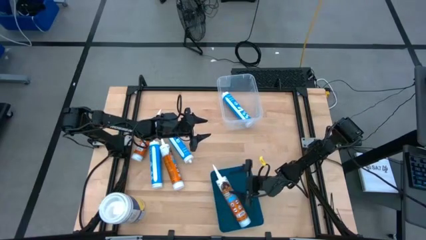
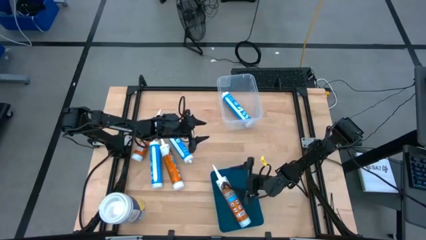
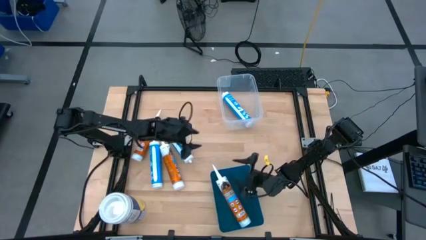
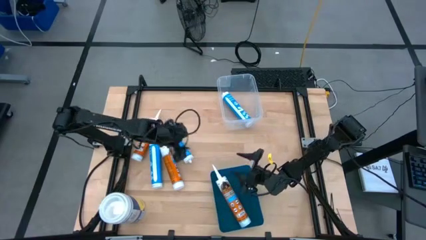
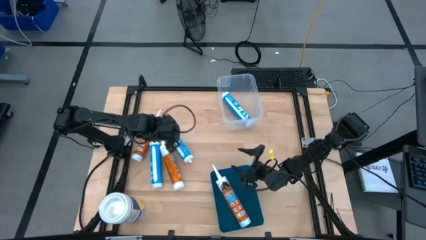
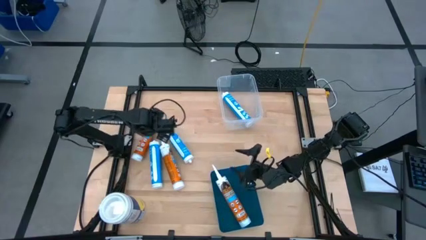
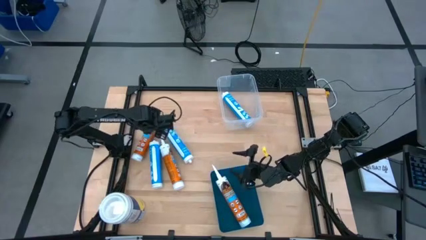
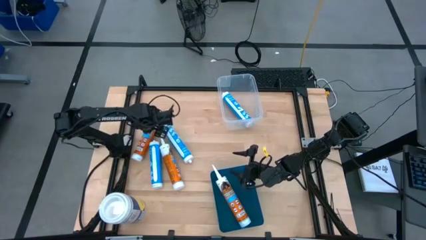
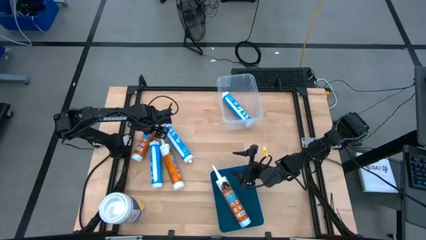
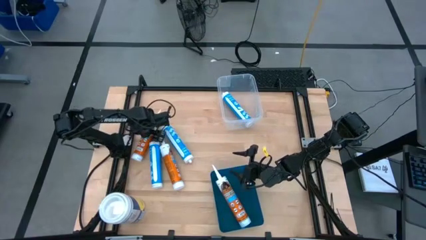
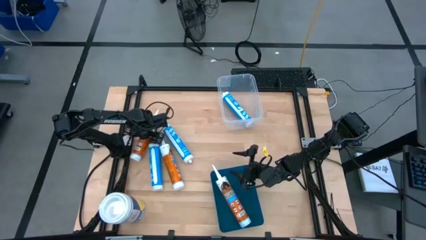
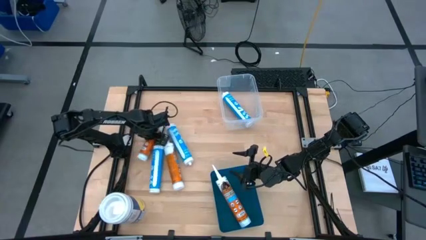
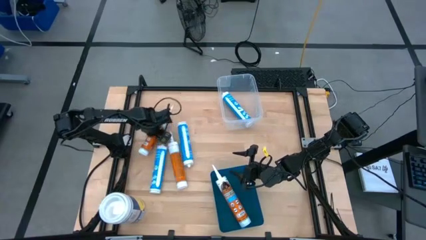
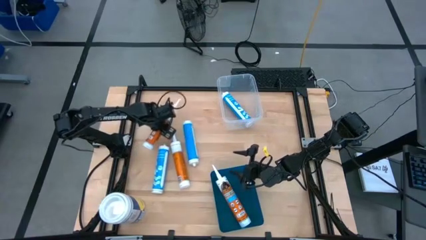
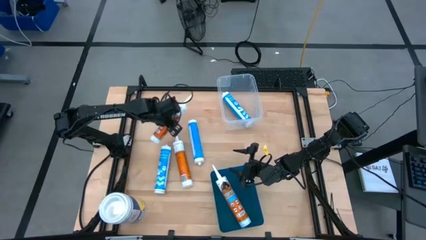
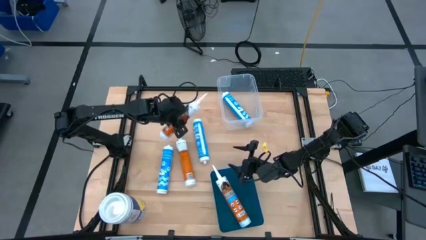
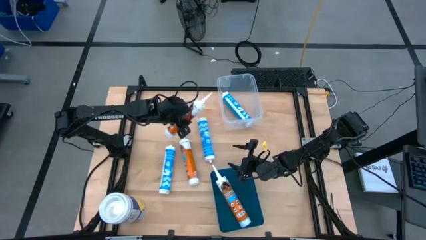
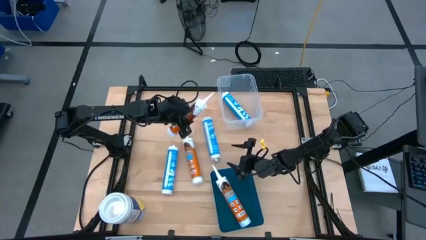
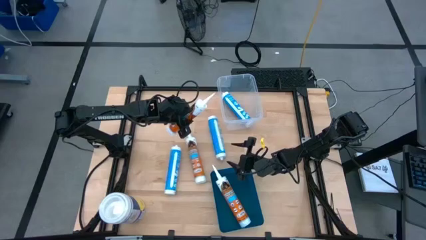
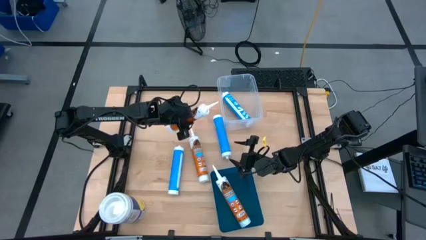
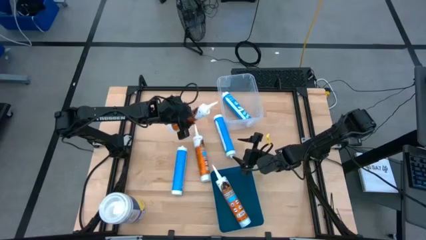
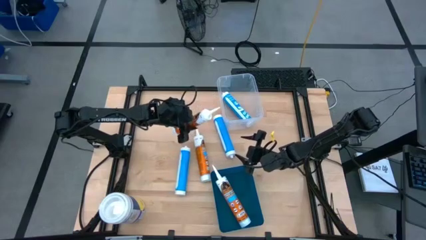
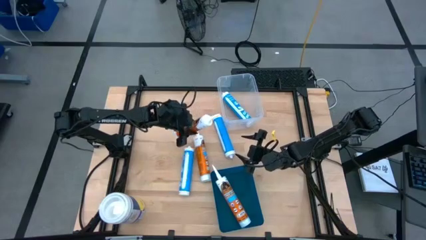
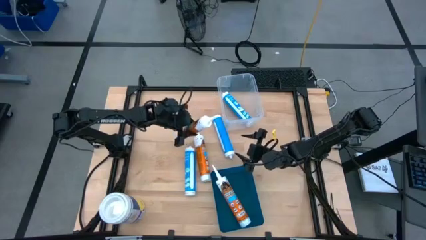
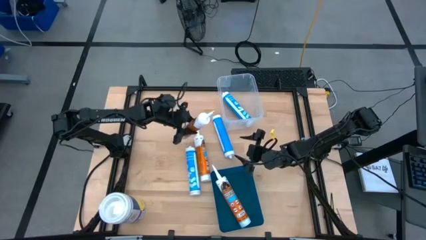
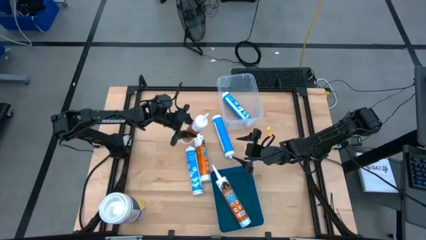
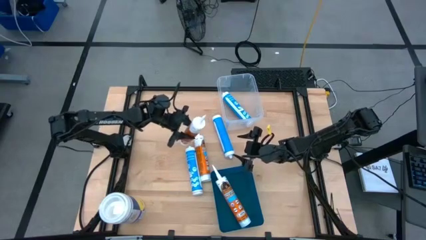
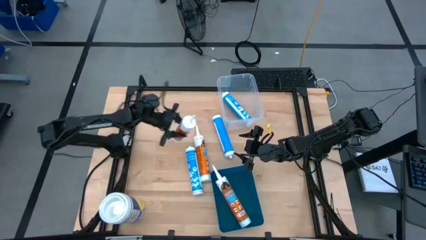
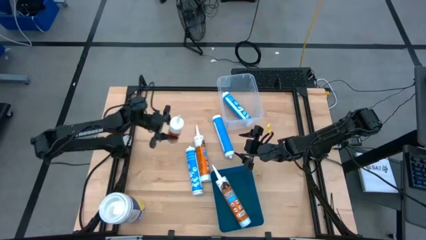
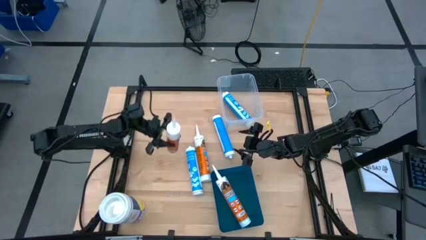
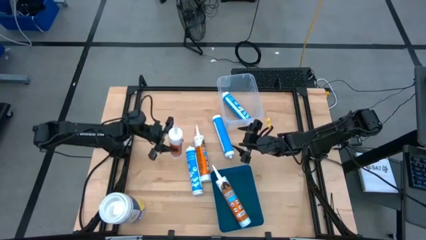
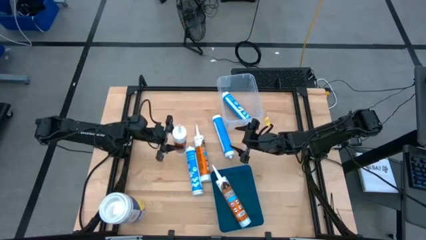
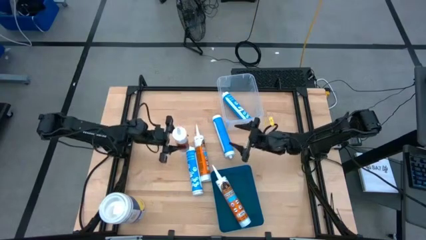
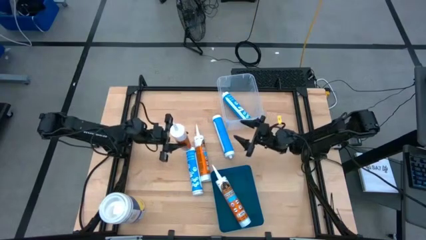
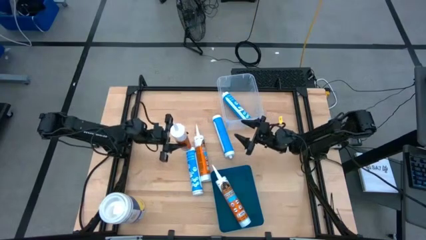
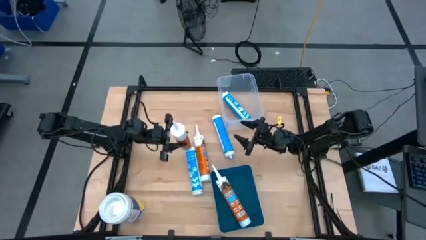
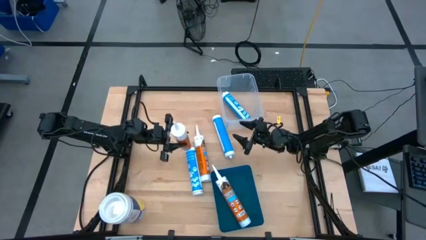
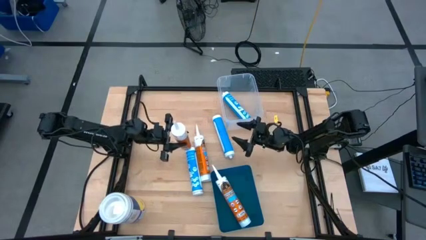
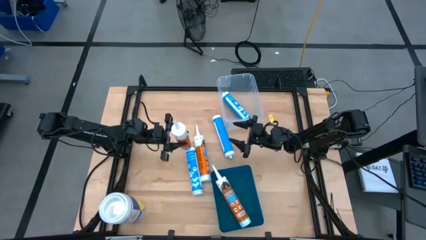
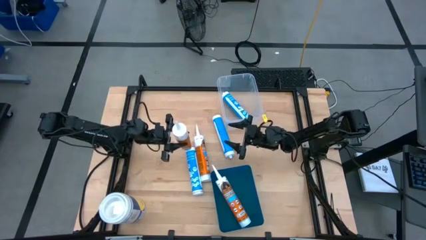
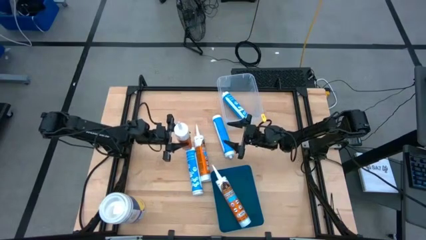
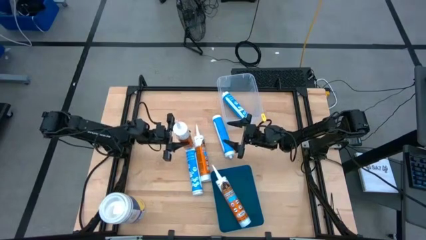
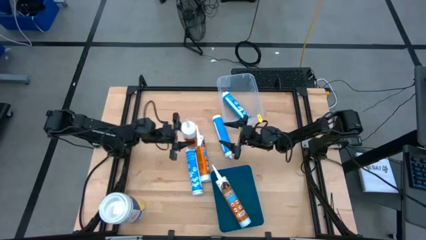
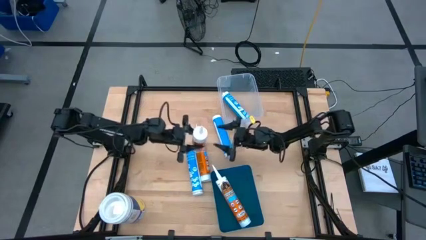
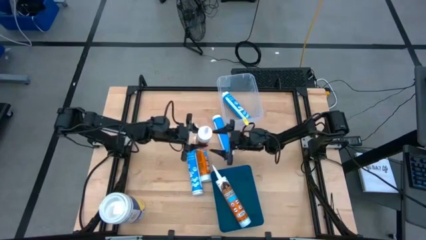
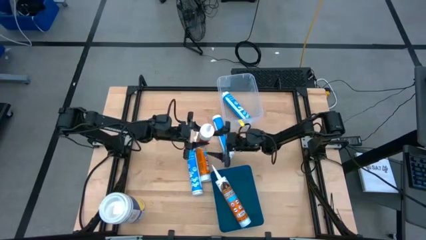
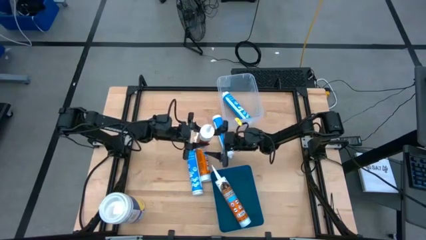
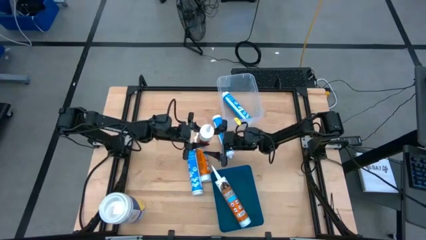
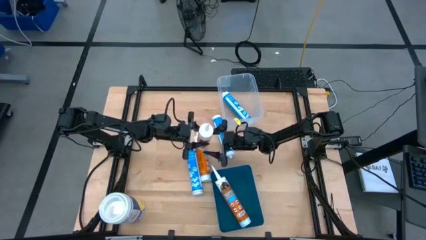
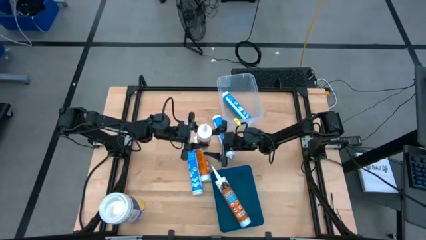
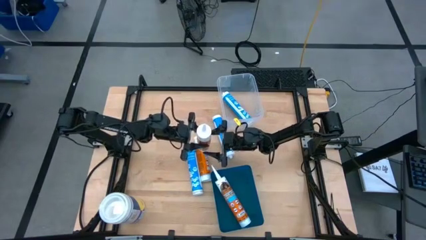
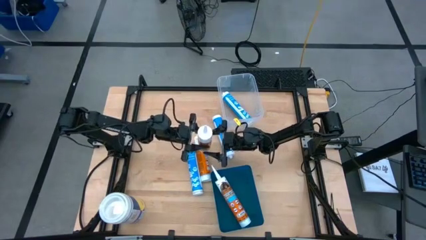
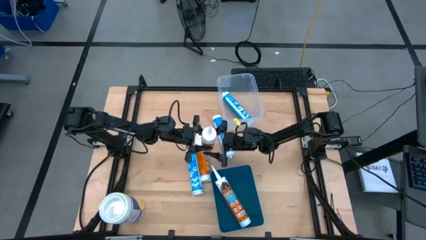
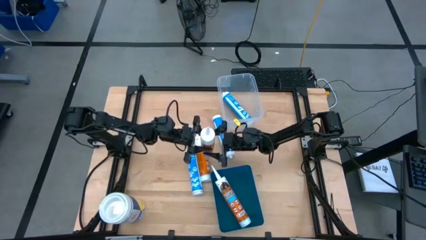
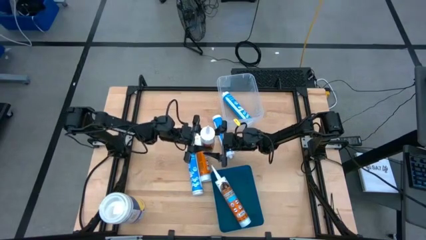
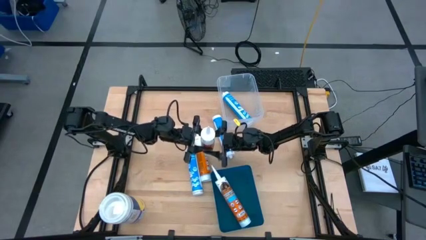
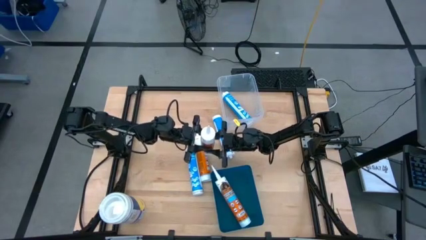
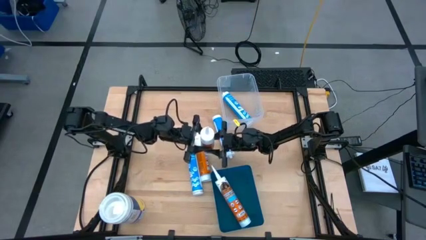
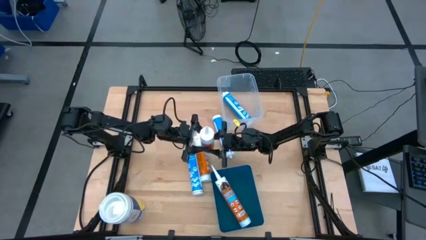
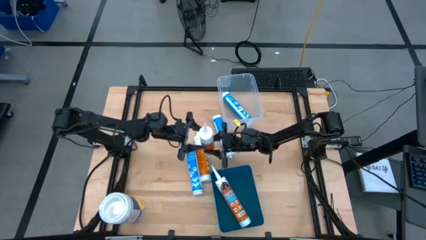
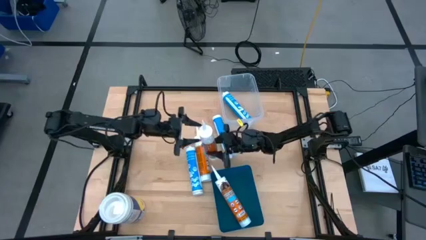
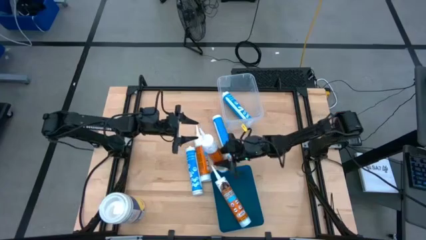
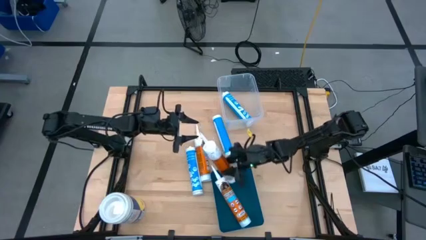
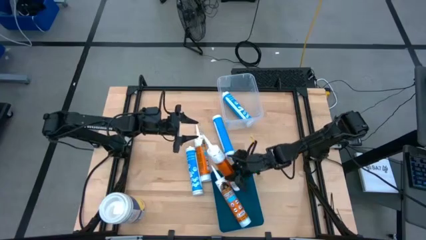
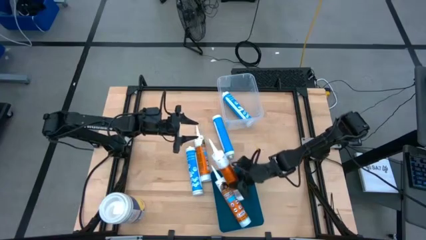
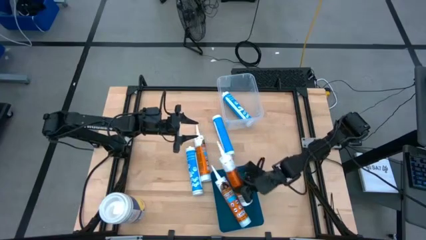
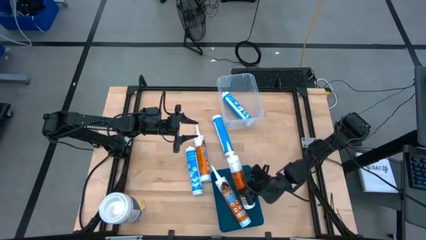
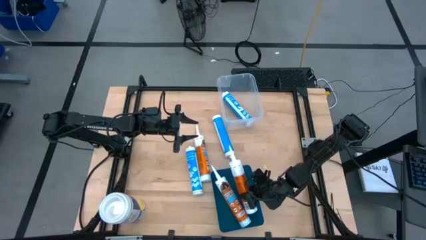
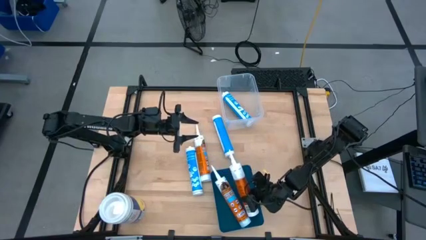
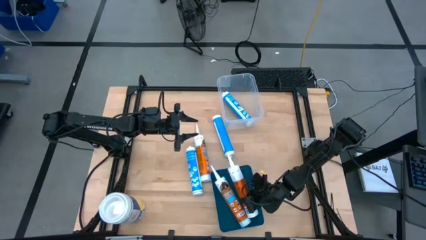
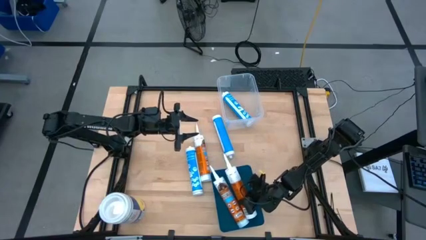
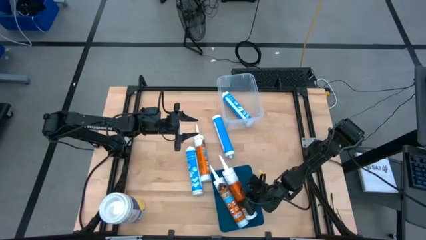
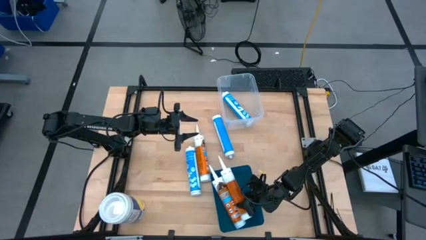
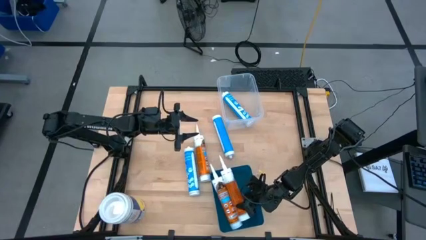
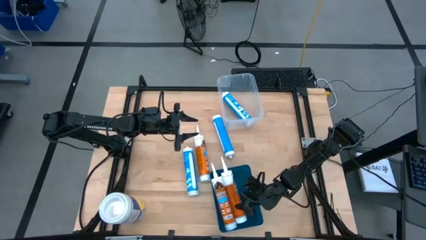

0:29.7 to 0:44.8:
Task: Sort silicone sealant tubes
Put the left orange sealant into the blue bin
